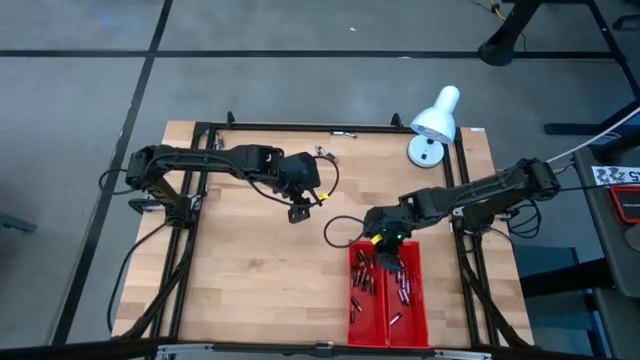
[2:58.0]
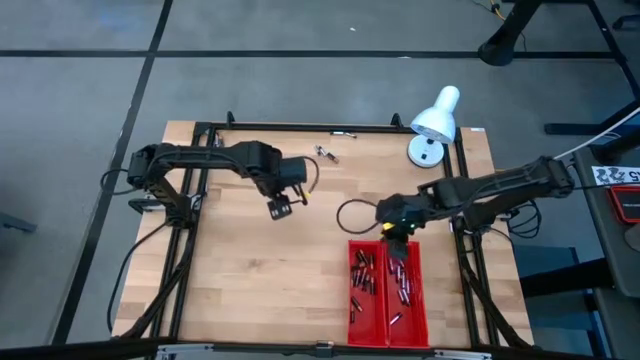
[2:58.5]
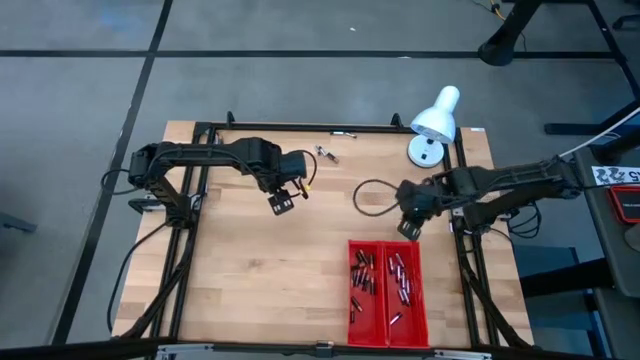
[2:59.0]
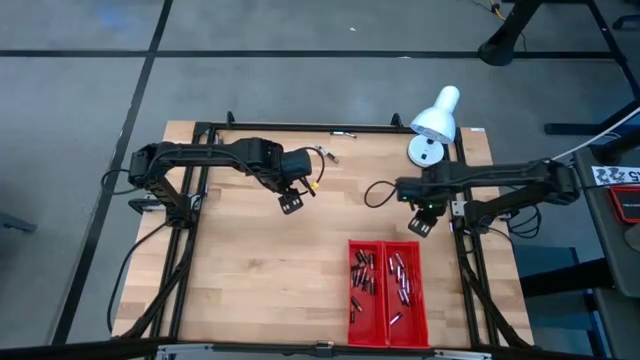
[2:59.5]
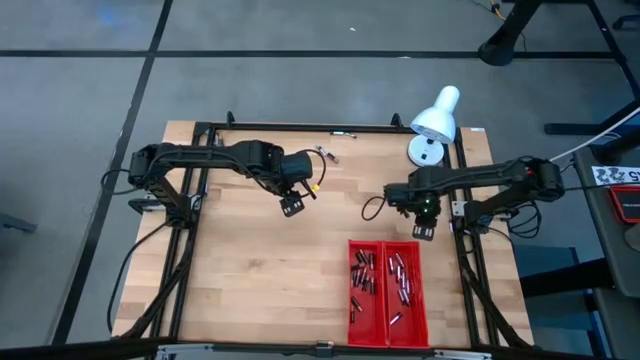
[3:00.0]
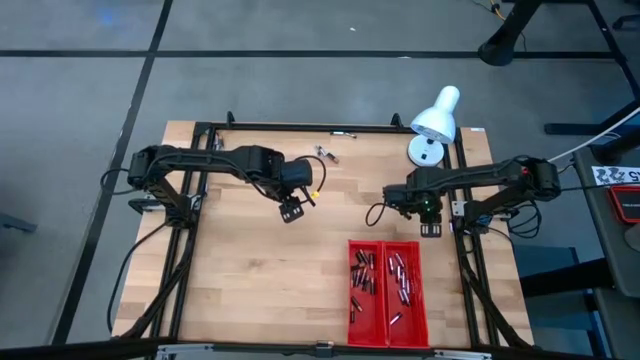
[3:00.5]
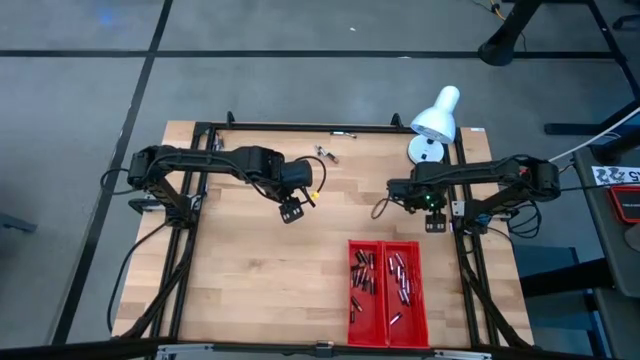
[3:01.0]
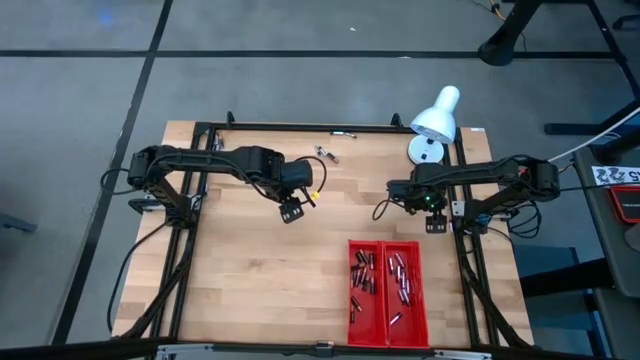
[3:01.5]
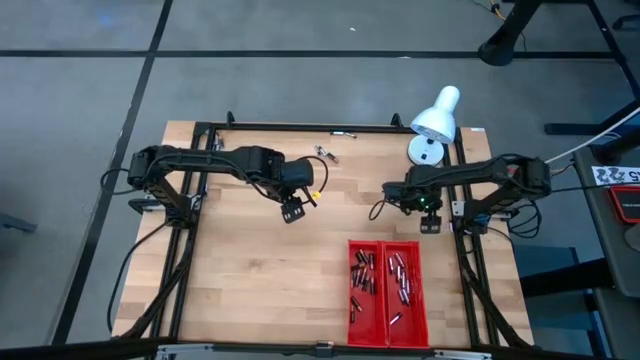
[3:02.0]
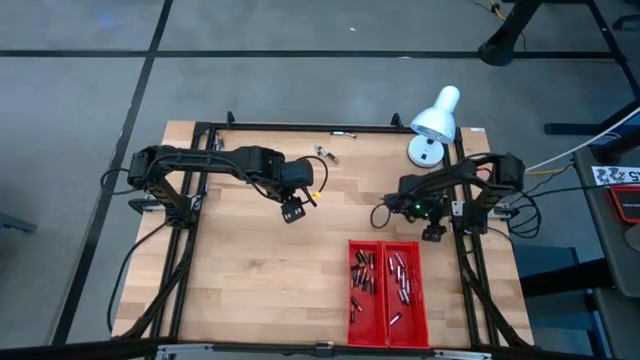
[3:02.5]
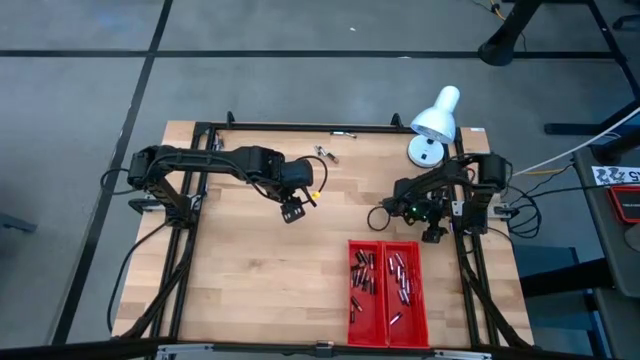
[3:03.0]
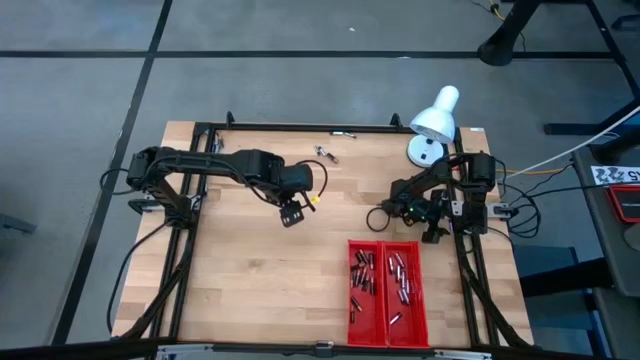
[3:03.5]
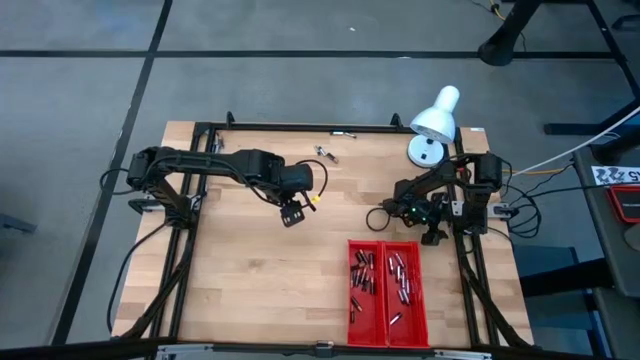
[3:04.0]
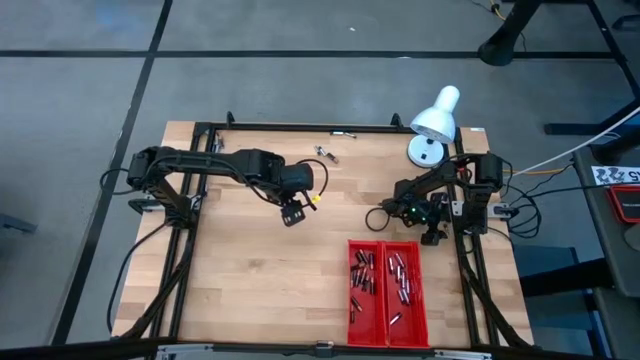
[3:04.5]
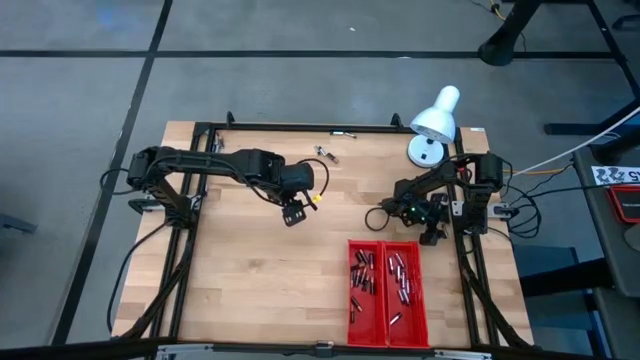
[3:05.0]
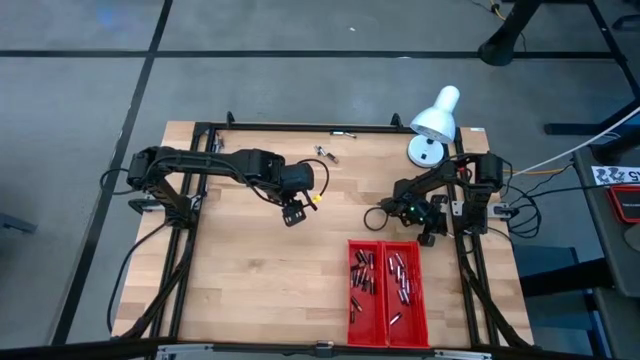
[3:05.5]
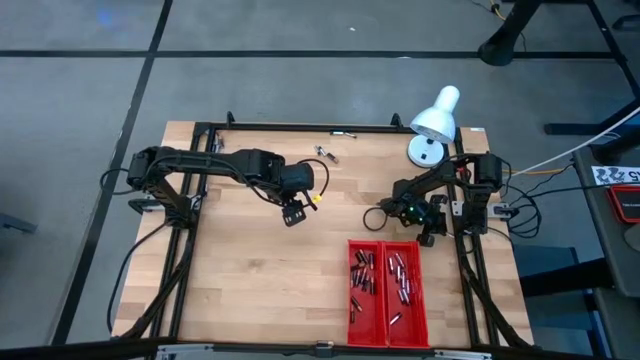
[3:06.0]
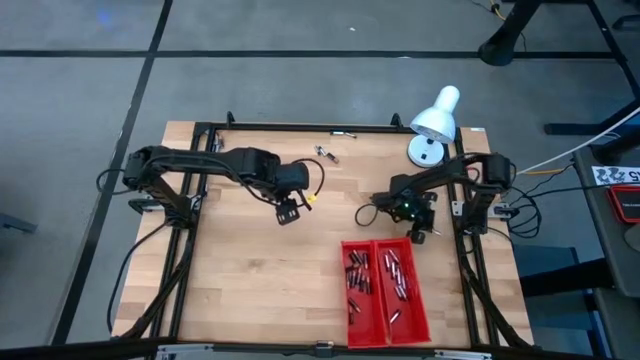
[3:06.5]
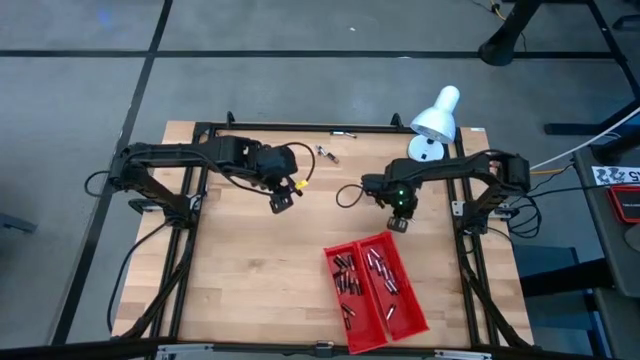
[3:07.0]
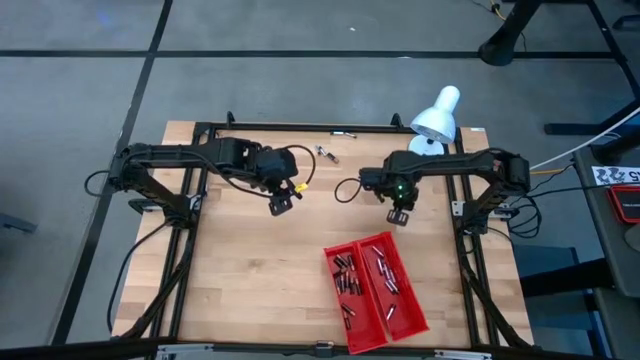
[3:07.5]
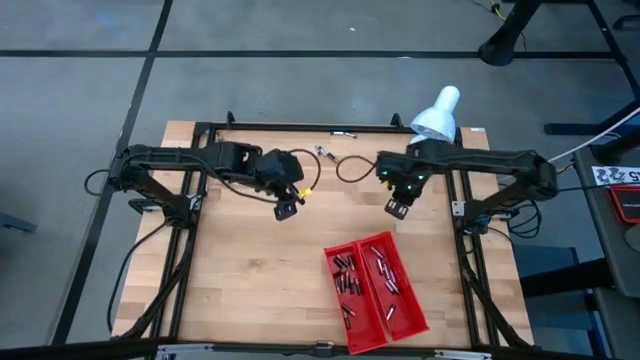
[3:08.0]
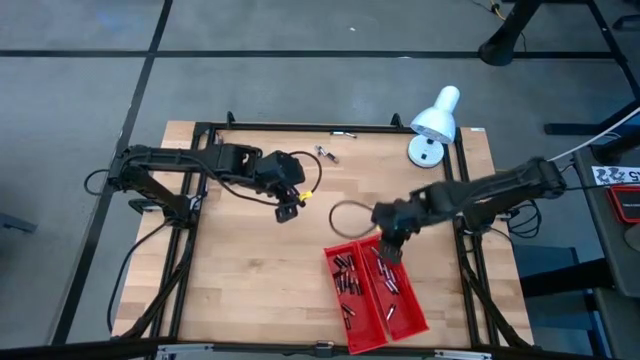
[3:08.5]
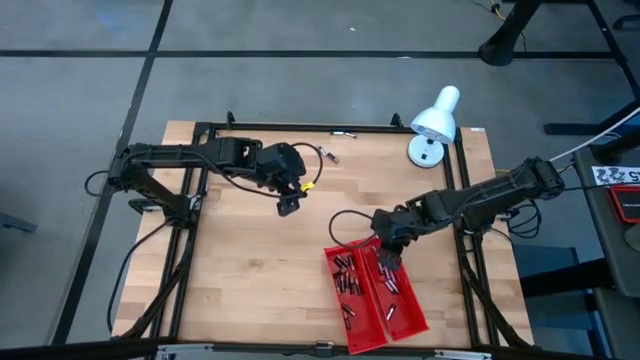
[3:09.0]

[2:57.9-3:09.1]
Task: Sort batteries
Put the silver battery into the right red bin

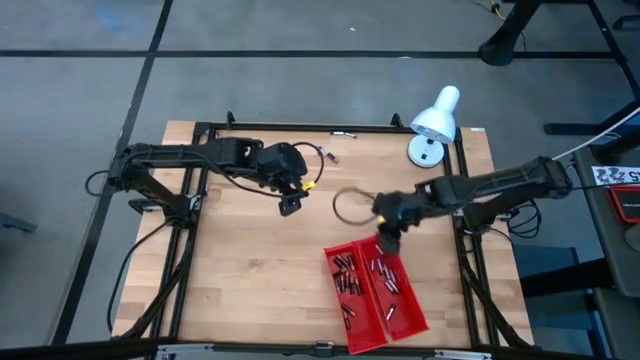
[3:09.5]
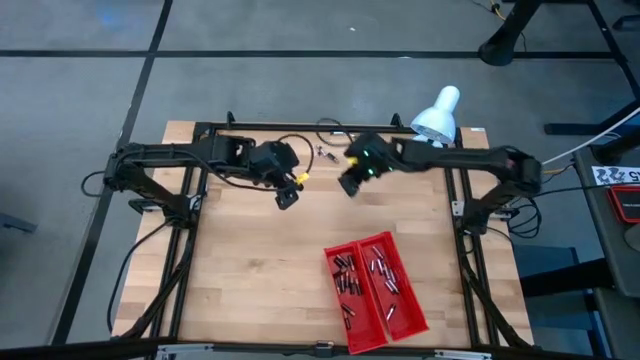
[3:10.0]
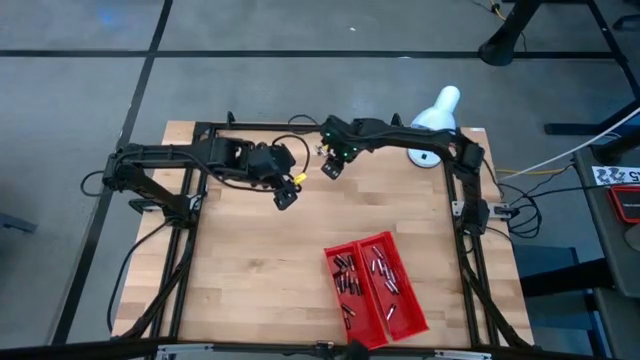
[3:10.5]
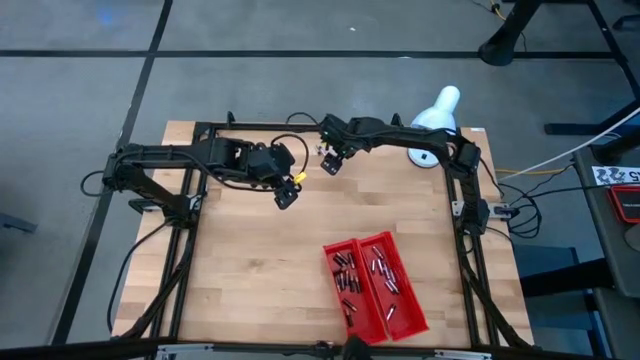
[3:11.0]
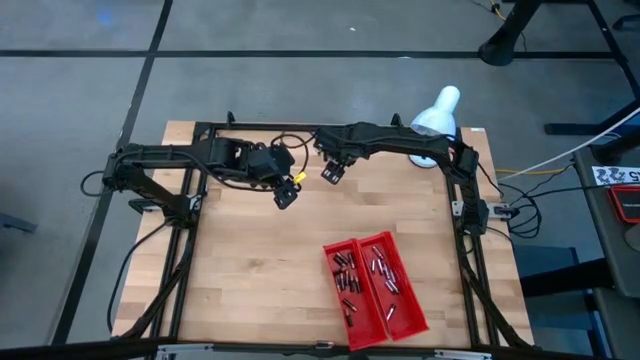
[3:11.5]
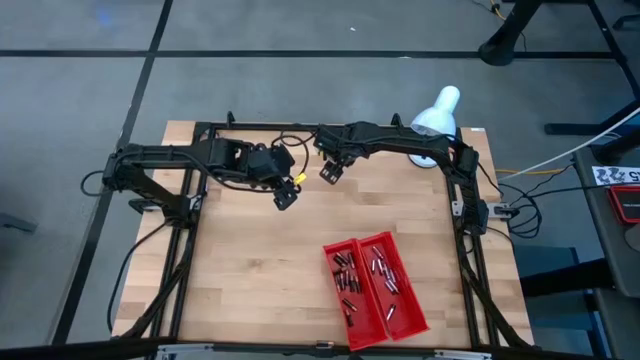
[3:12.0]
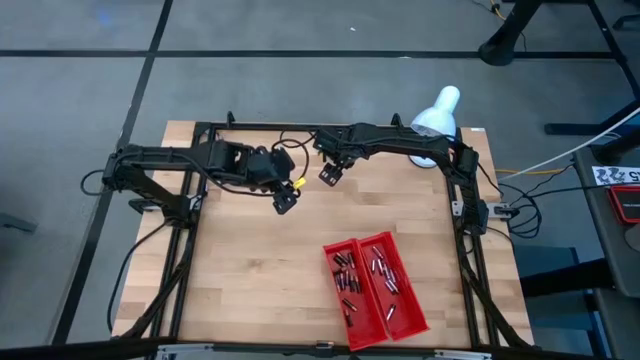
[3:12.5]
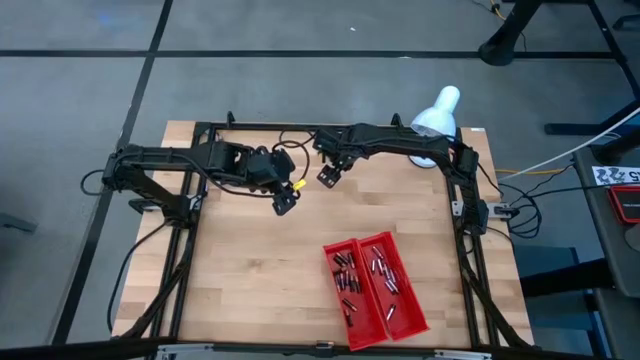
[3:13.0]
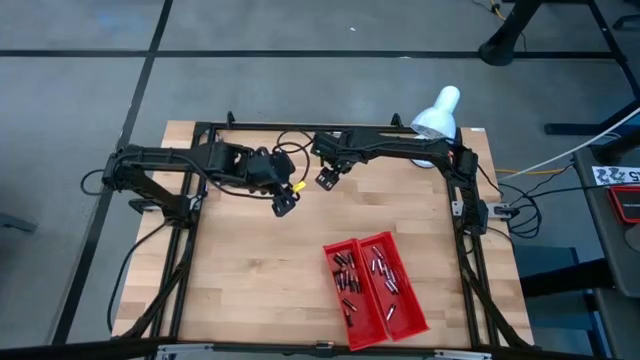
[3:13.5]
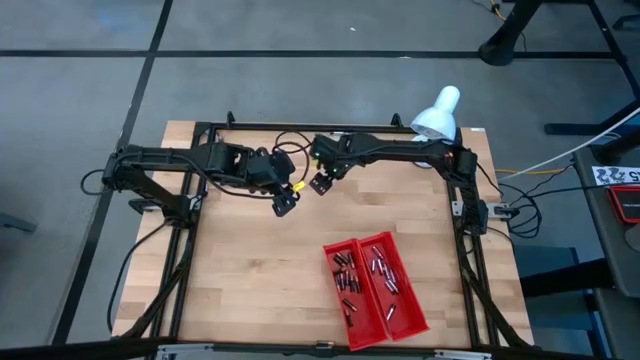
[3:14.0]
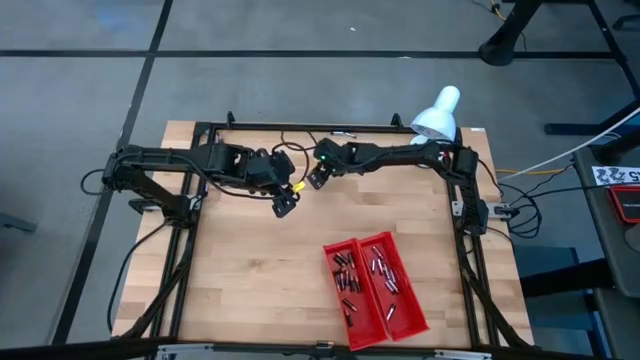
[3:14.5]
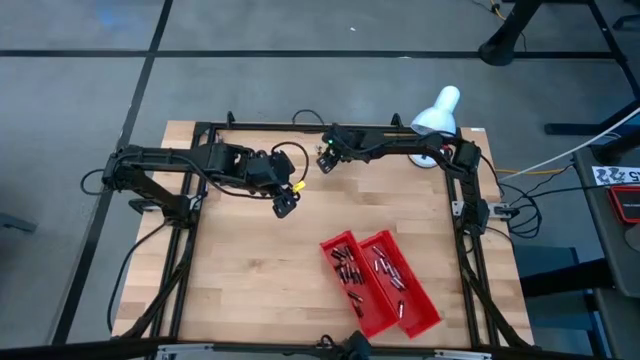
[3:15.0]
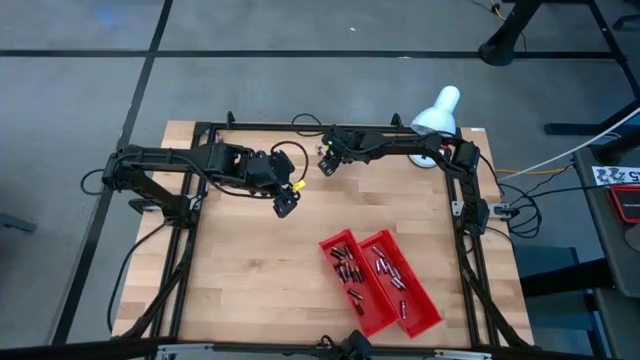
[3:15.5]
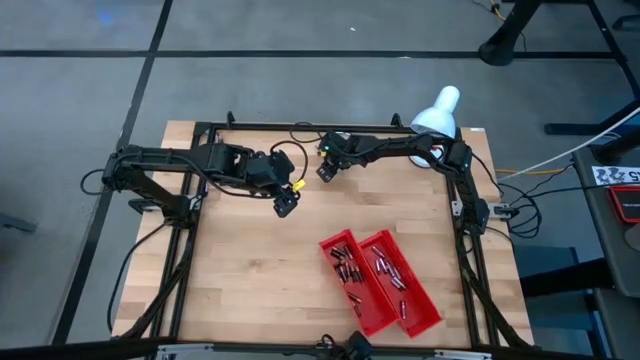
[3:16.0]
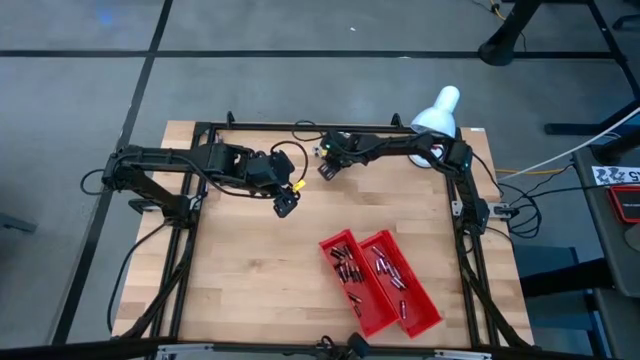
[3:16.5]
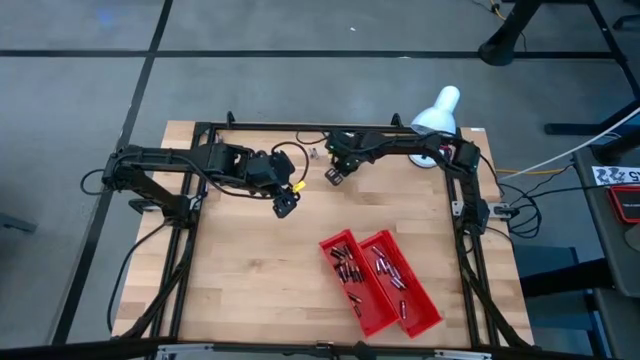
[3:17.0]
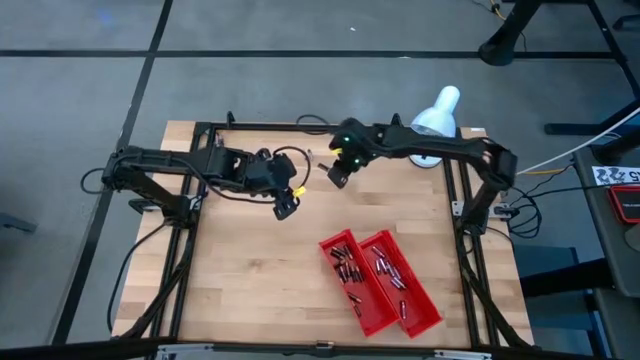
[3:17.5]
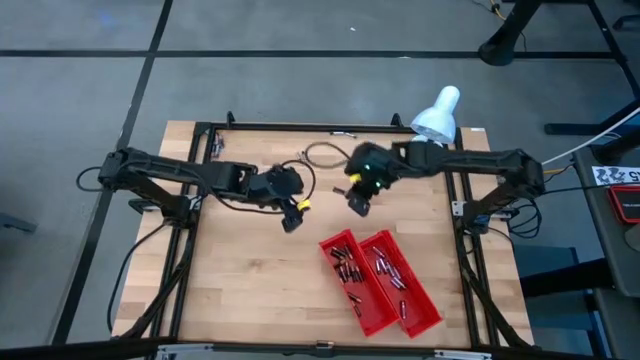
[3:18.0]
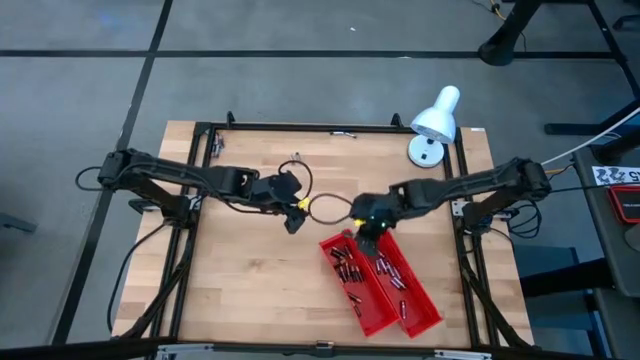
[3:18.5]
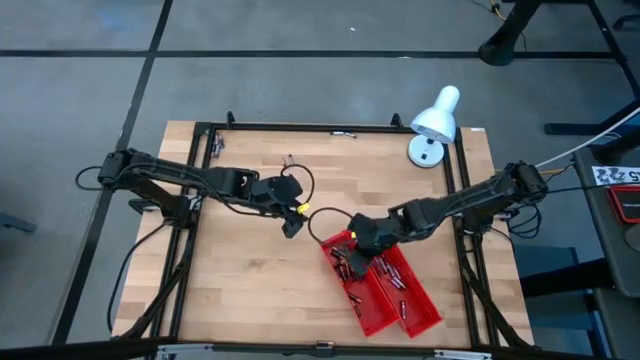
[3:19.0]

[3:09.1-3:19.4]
Put the black battery into the left red bin
